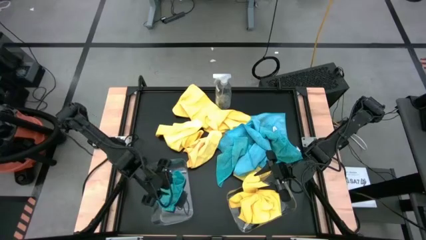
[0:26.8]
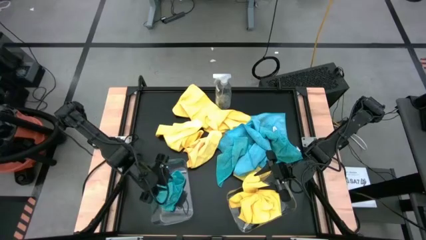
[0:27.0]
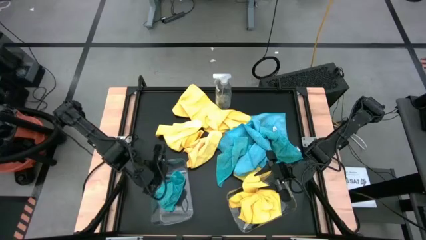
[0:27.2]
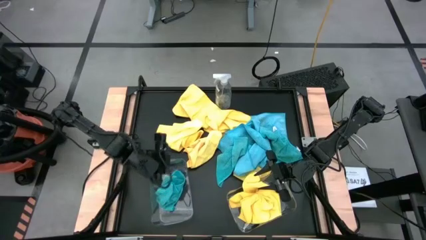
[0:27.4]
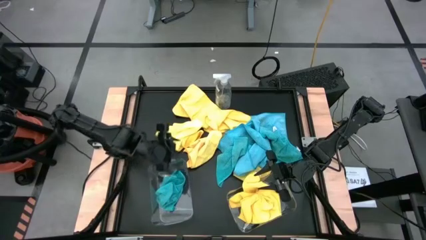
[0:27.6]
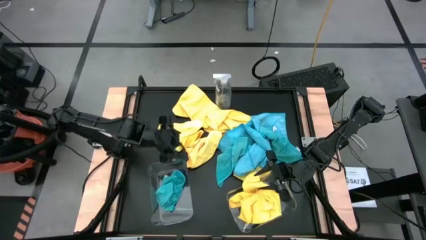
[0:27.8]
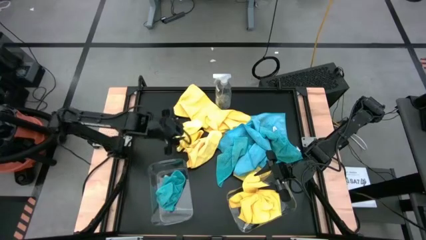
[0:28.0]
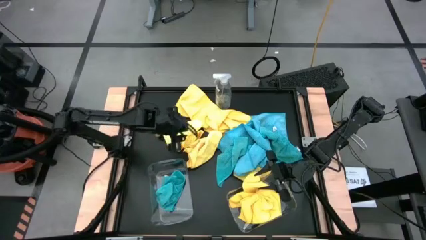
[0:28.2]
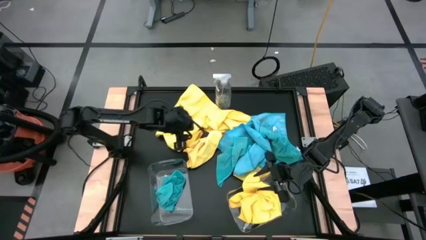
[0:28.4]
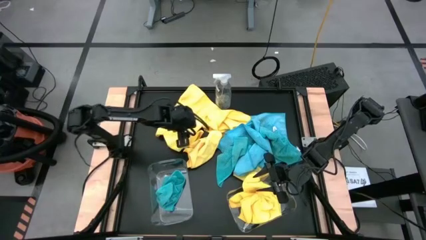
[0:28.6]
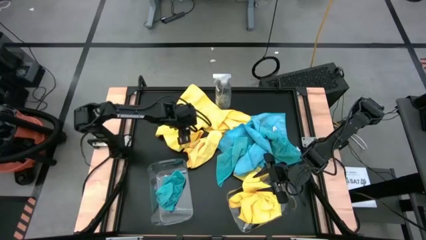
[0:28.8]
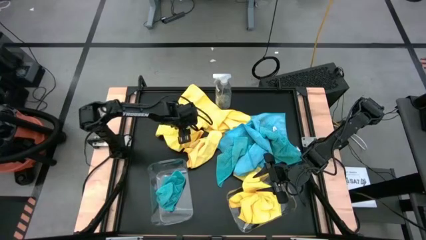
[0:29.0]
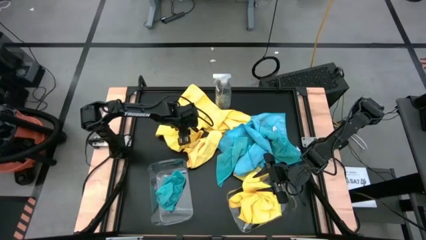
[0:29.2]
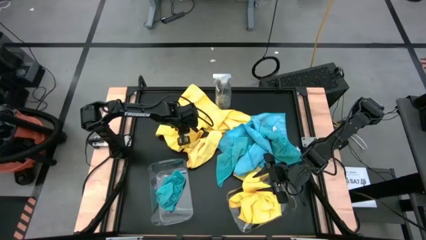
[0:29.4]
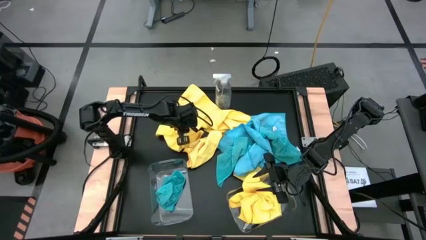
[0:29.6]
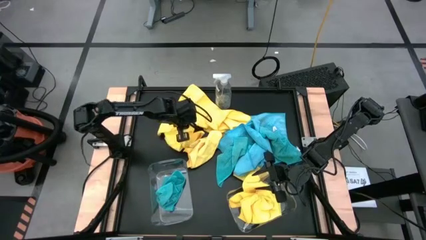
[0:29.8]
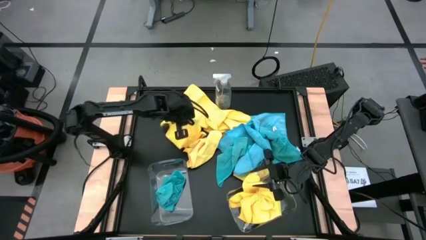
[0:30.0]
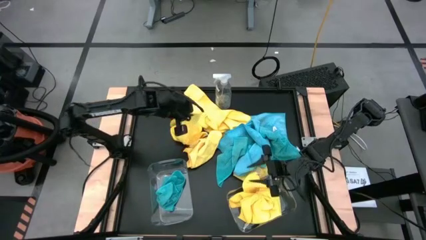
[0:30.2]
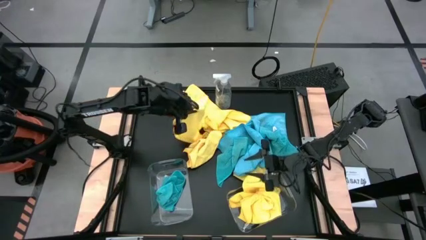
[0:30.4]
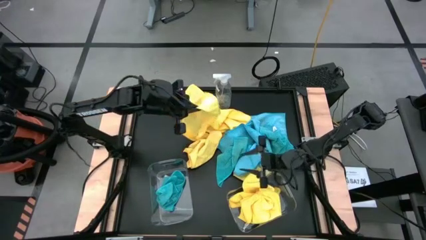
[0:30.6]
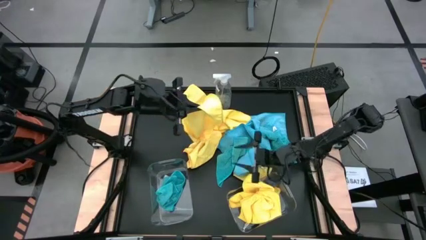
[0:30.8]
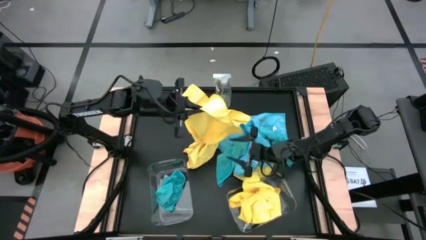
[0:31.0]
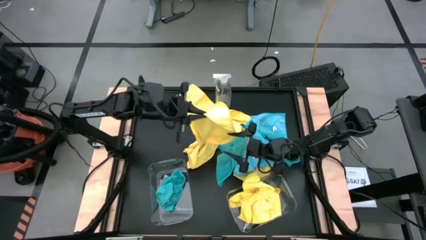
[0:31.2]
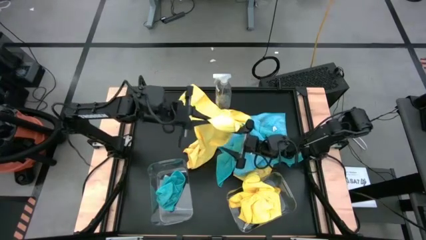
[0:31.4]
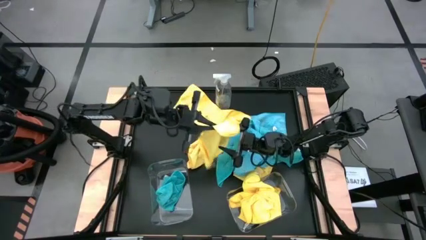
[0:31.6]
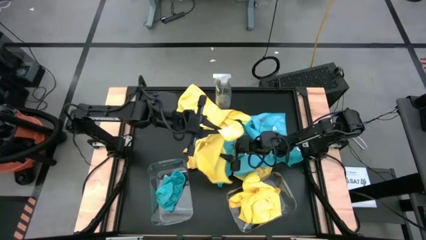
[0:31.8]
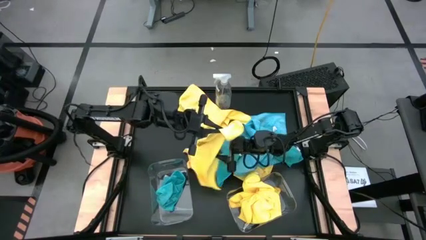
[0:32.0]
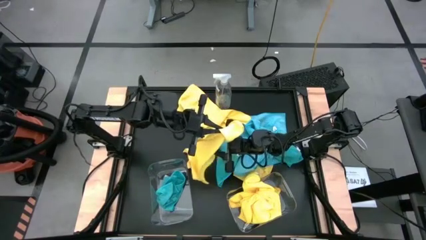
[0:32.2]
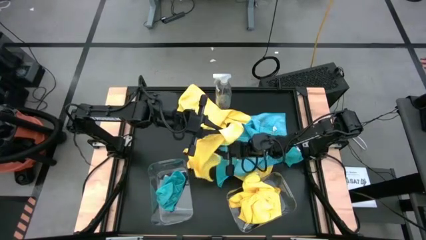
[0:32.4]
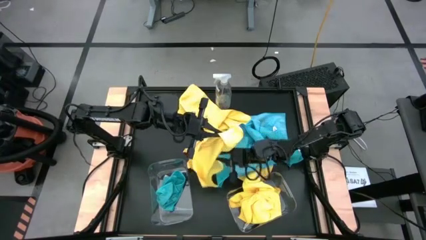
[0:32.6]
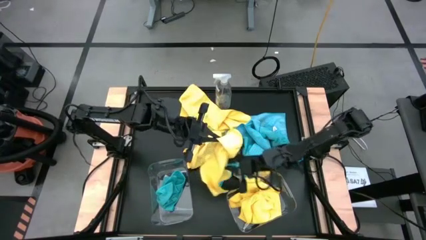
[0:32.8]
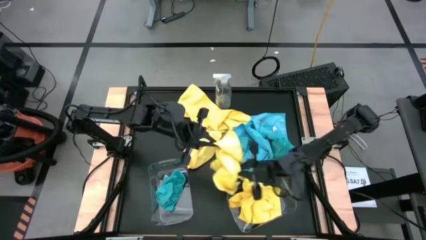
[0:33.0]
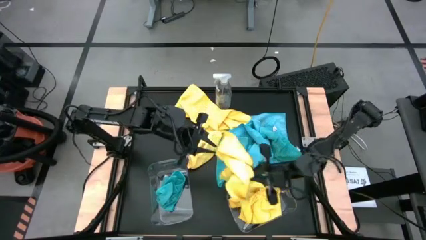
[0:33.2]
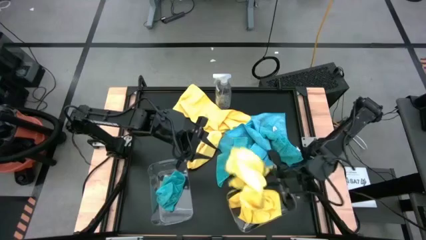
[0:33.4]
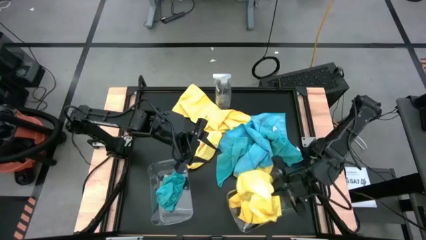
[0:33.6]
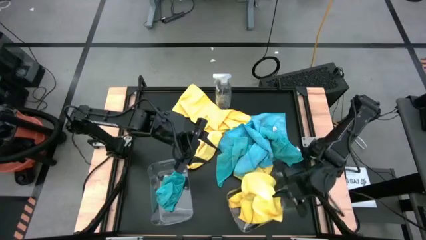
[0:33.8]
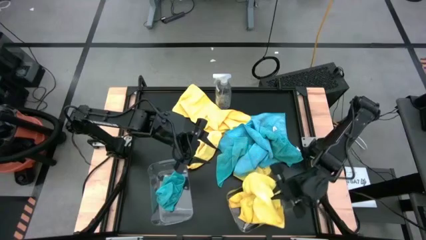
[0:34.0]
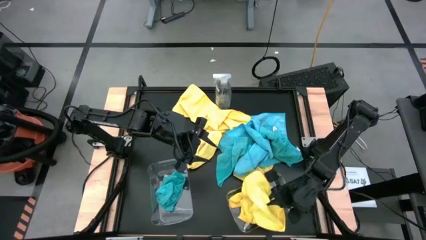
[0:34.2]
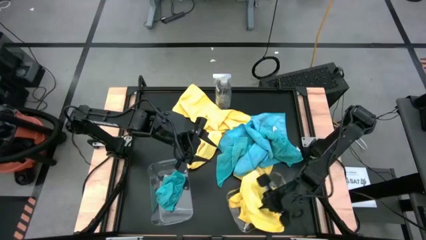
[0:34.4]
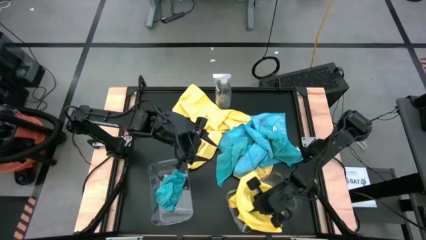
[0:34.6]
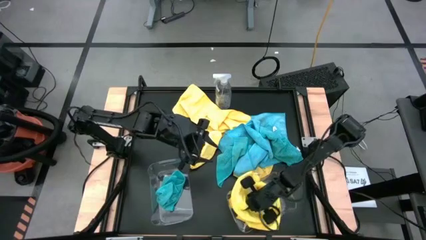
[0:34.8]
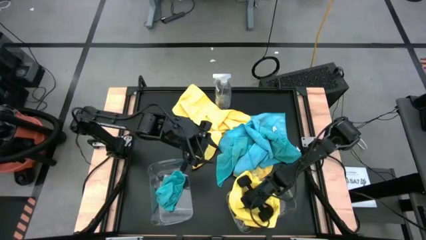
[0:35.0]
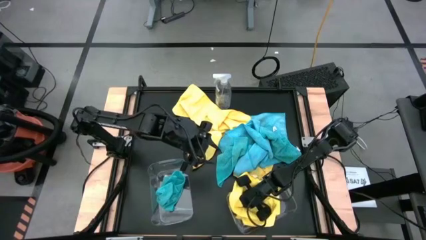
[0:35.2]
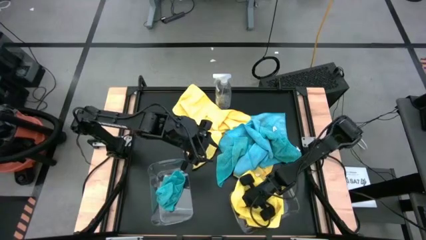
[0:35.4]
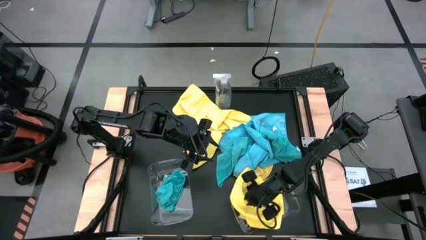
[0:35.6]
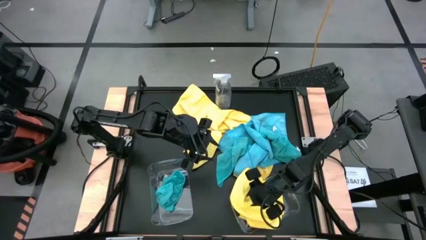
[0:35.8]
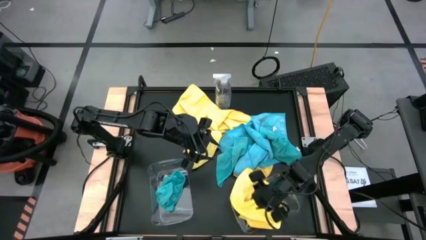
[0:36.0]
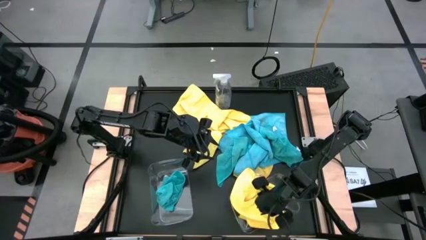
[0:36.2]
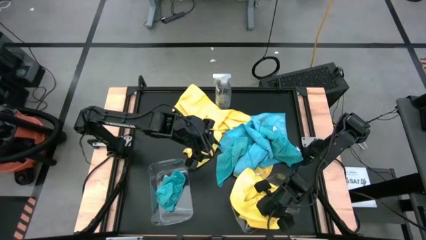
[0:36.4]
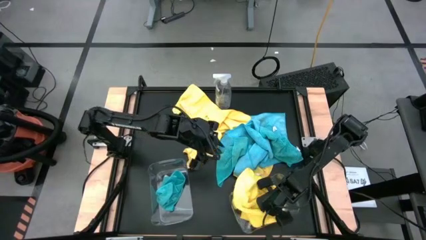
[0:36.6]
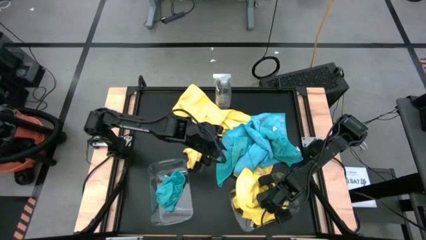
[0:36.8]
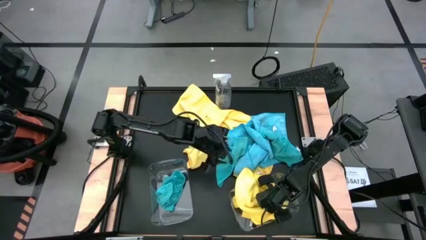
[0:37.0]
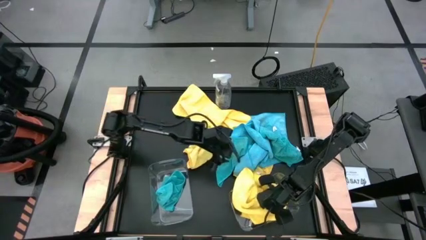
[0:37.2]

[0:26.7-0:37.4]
Task: Sort microfiber towel by color & place in baskets
Put the yellow microfiber towel into the right transparent bin

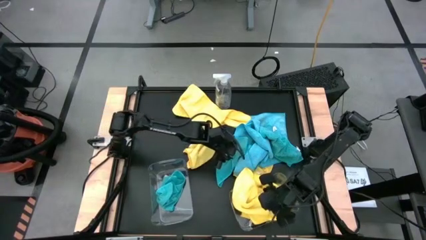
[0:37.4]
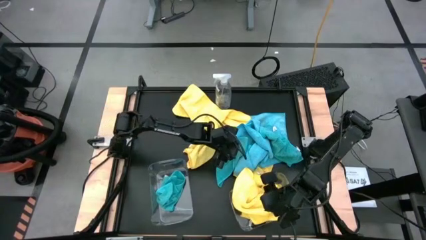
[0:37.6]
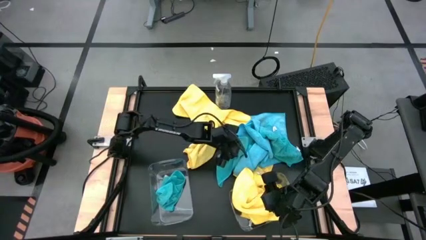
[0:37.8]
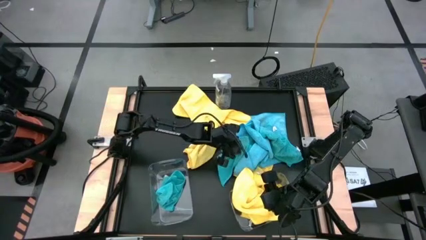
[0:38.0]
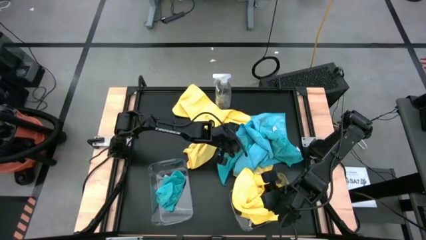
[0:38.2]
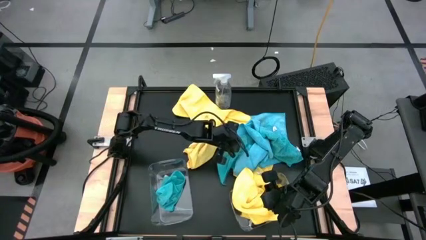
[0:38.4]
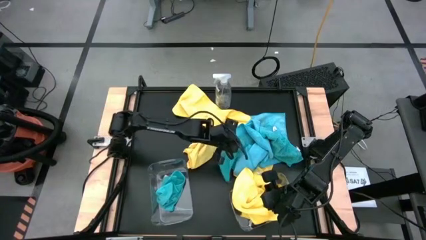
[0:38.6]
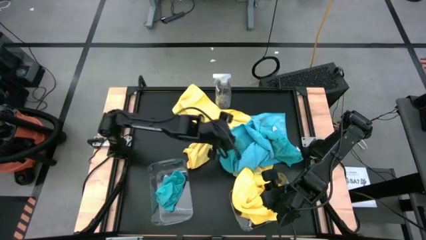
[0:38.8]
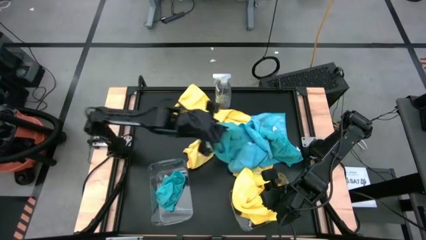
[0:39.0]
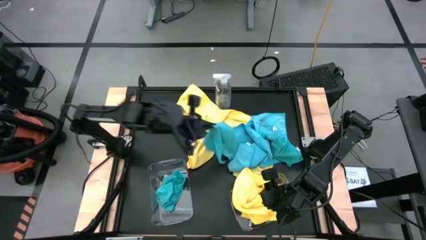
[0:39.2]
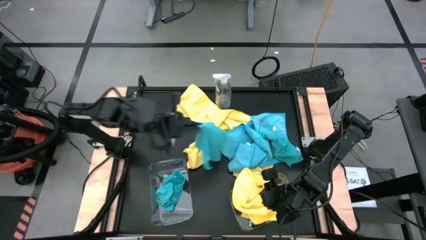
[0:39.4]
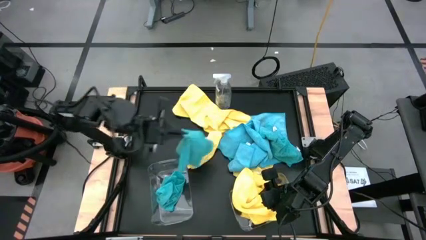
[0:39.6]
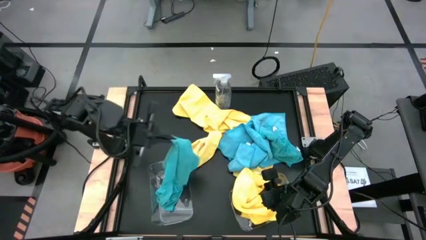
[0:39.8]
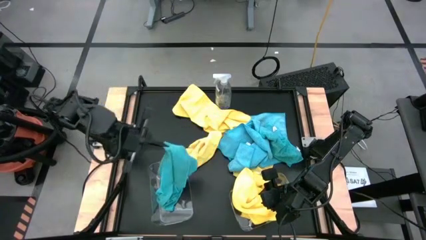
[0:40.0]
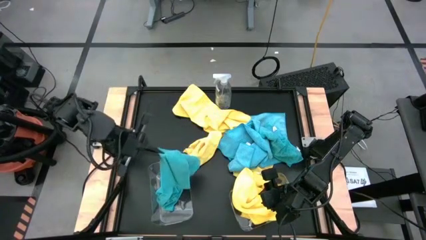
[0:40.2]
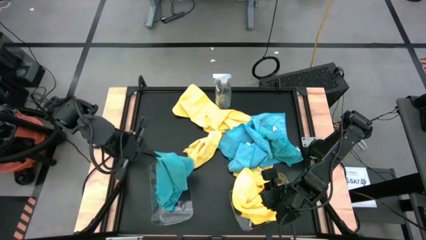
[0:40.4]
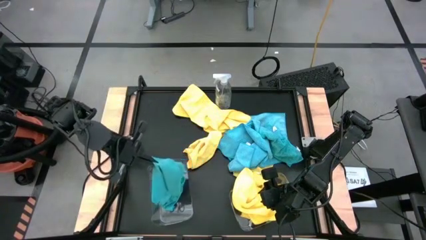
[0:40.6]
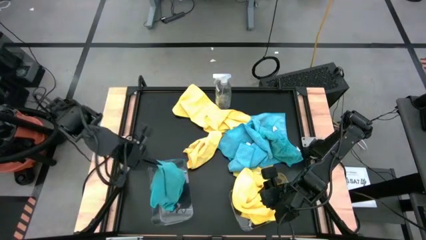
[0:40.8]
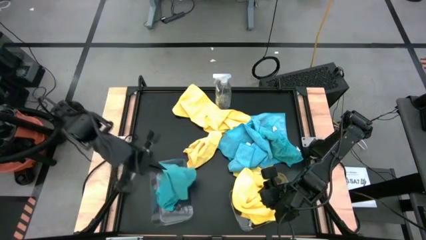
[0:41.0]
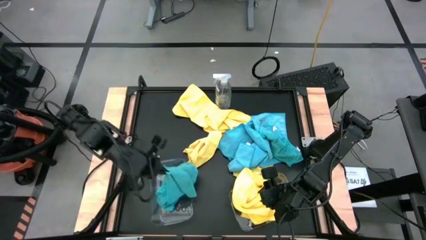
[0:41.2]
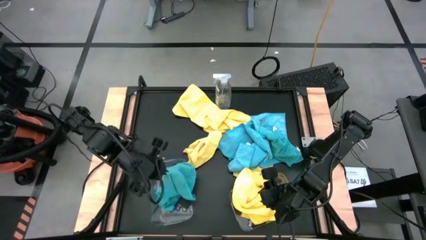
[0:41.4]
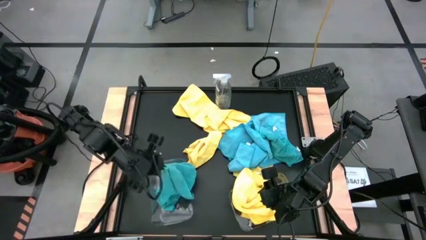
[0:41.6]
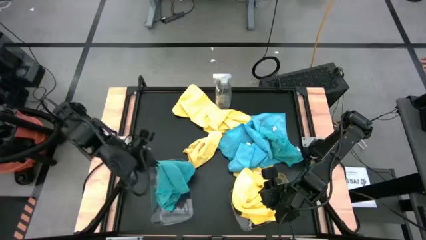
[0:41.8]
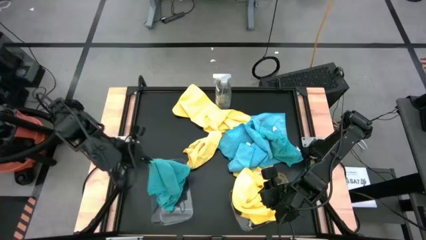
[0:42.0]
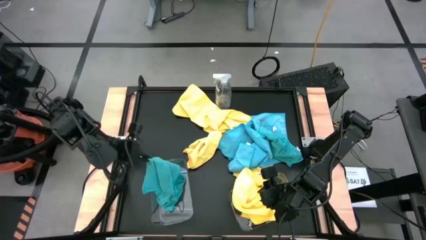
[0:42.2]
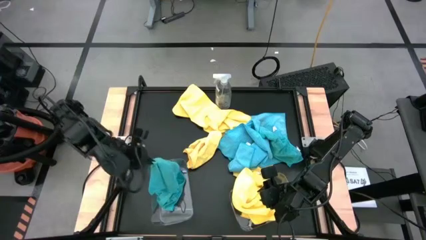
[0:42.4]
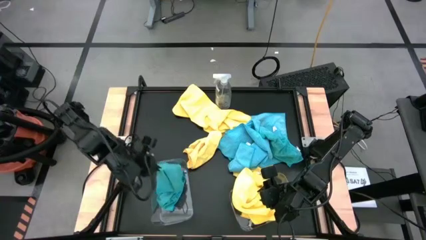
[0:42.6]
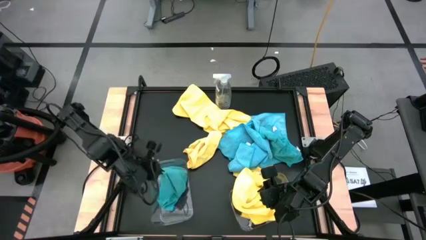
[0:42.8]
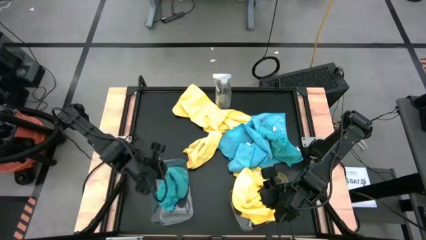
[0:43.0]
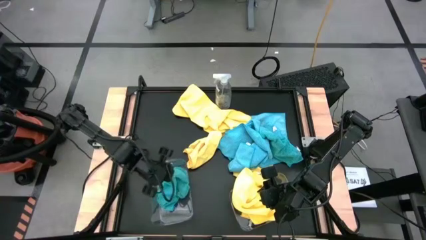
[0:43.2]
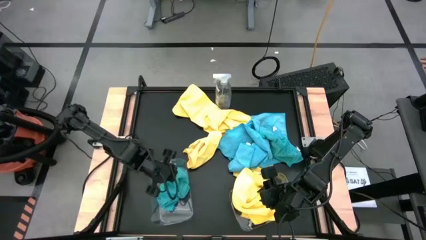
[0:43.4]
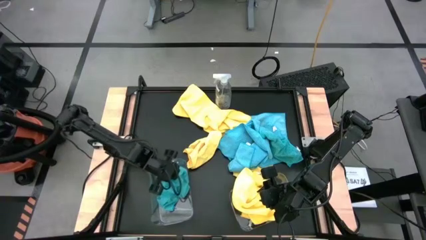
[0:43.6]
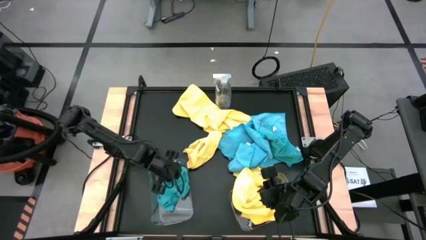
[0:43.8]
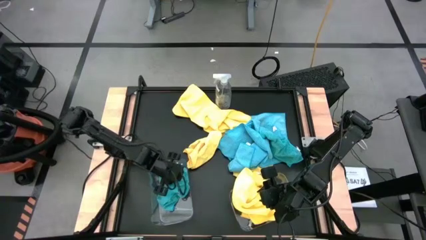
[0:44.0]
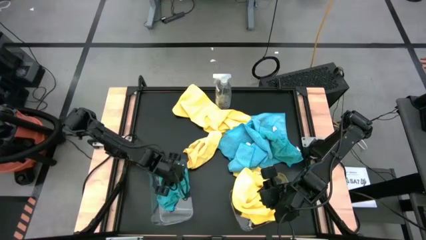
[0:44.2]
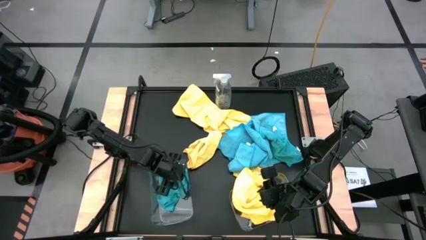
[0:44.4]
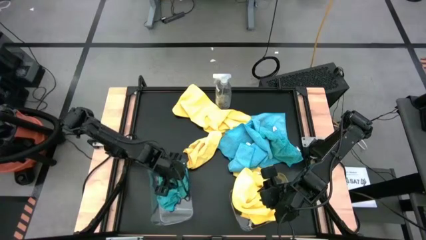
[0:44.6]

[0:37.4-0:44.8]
Put the blue microfiber towel into the left transparent bin
